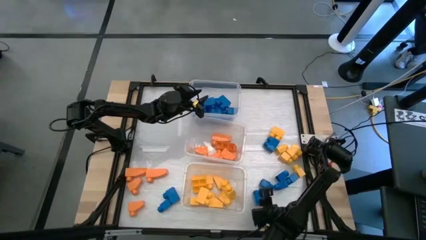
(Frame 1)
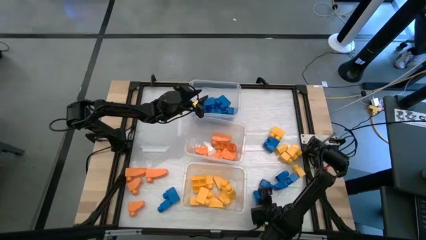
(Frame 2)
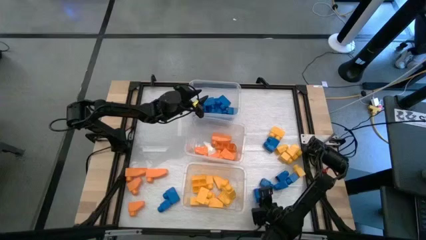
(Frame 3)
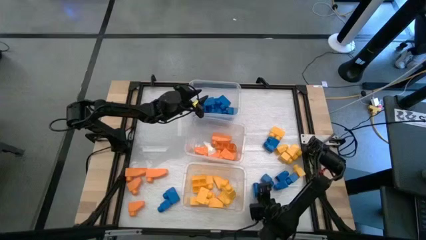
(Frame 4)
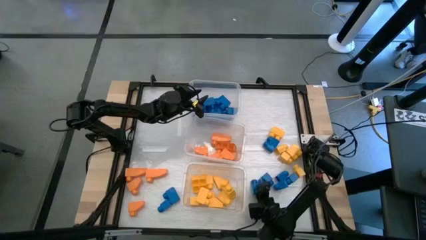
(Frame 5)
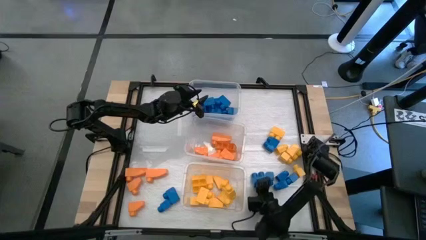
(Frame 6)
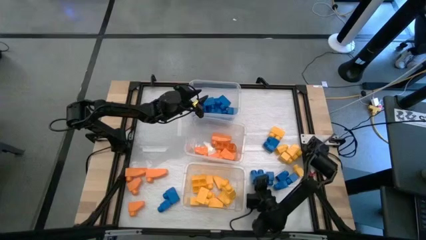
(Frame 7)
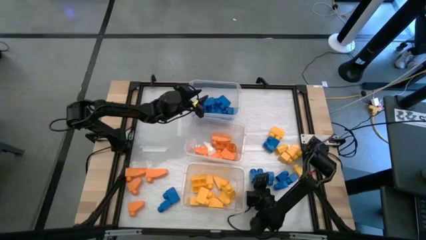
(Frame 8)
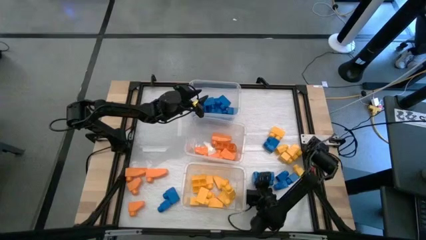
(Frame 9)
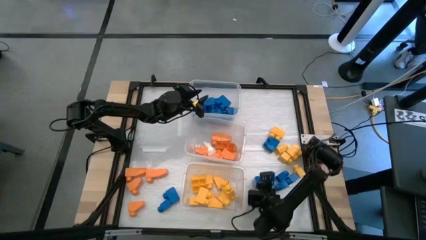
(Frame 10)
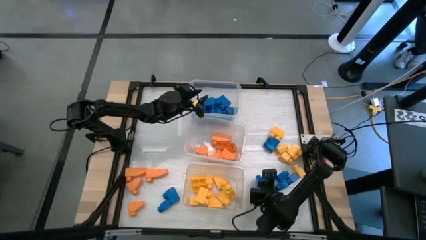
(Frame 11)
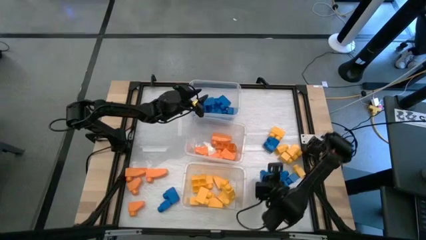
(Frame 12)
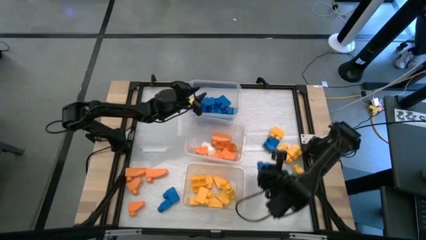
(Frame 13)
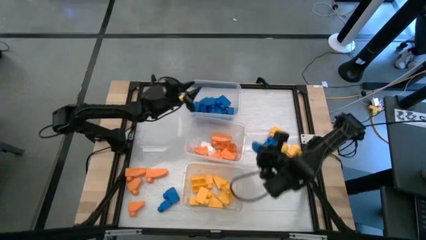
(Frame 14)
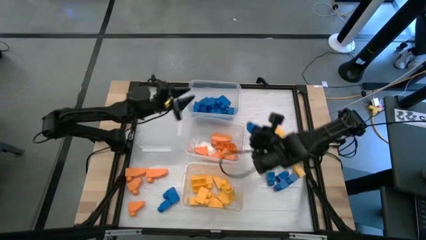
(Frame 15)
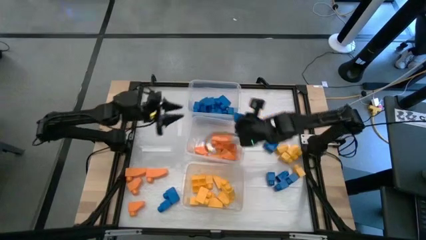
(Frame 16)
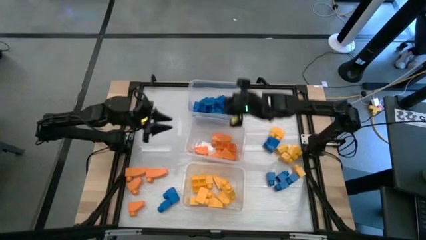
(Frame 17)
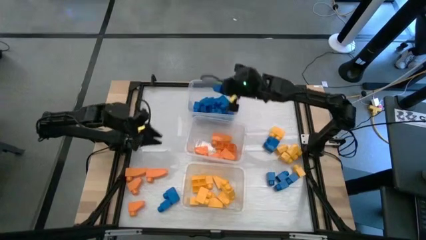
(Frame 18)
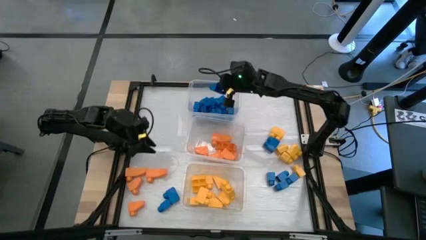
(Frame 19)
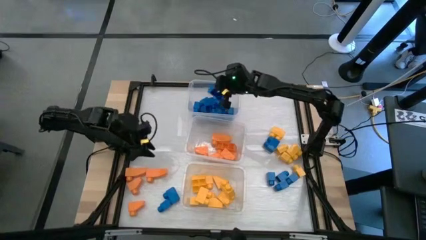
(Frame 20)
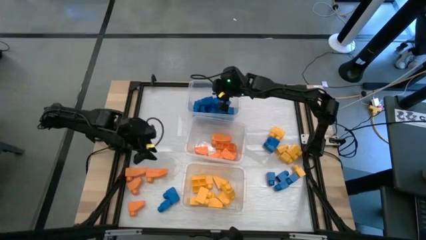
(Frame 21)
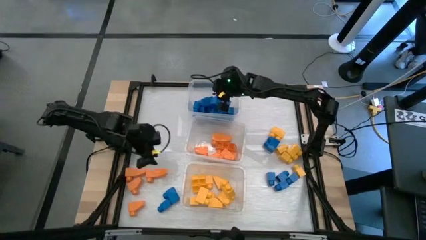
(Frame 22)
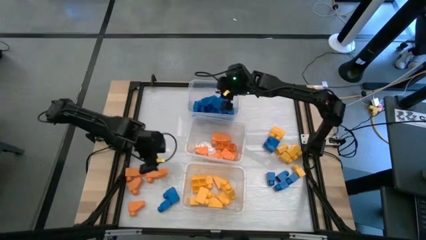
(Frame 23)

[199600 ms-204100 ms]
Task: Sort blocks
Put the blue game piece into the top transparent bin

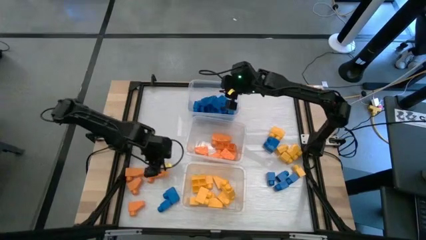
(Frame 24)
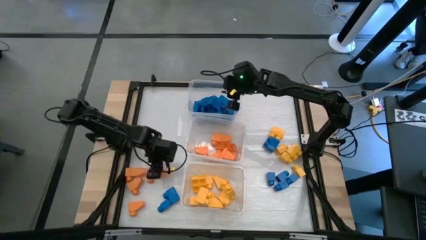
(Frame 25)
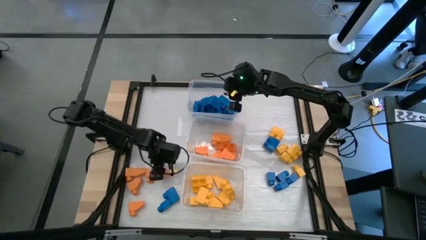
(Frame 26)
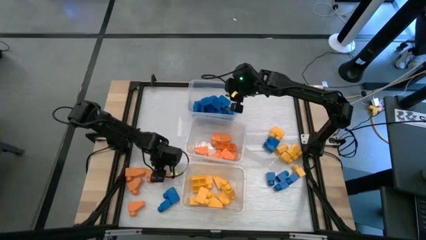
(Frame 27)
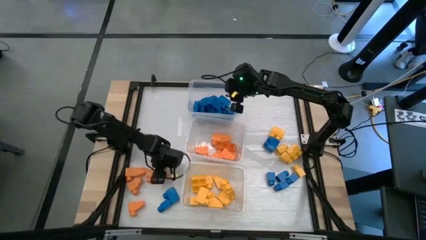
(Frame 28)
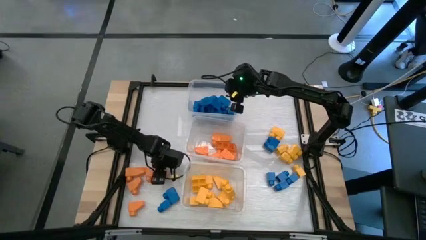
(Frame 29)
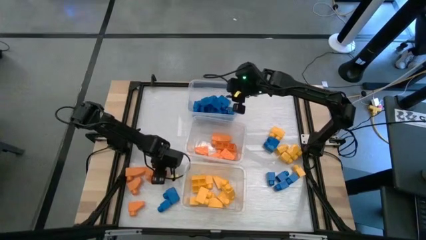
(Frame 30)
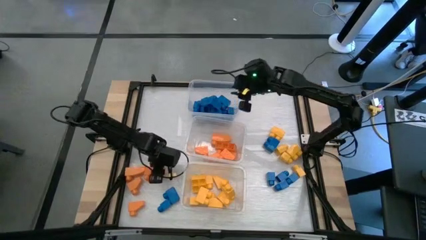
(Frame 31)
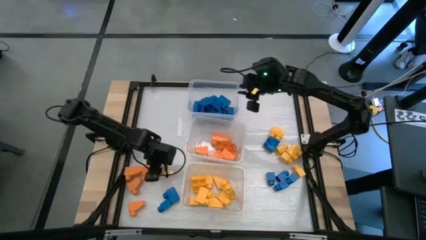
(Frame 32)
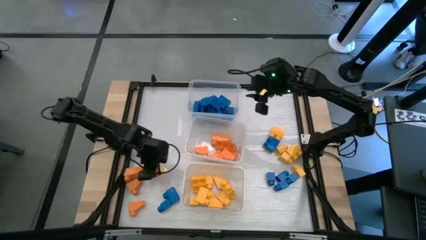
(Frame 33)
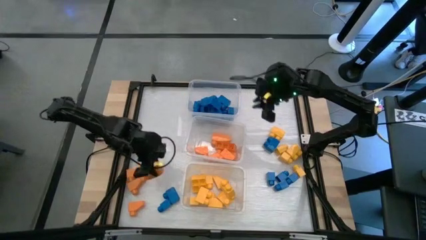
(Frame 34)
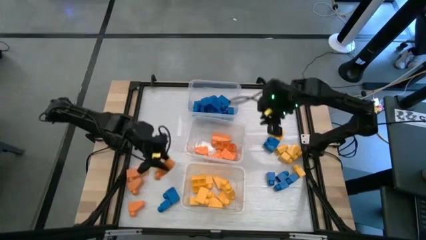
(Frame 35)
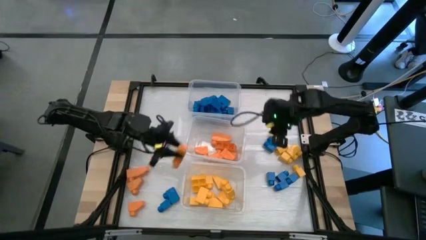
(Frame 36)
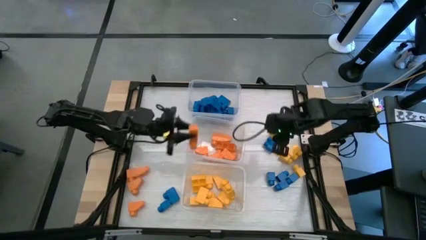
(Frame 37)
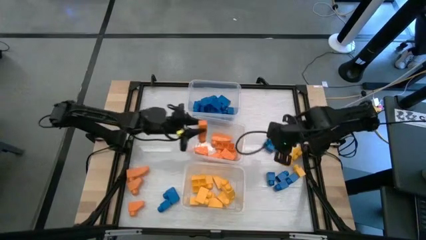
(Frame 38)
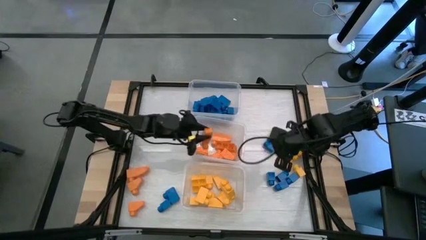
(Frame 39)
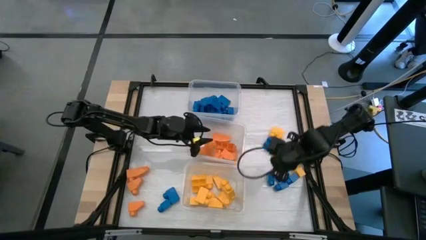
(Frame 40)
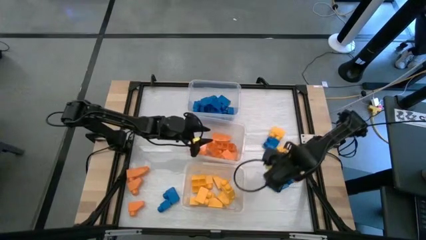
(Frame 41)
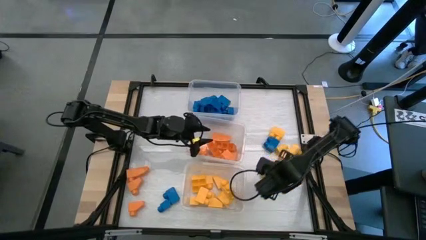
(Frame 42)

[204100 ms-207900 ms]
Put the orange game piece into the middle transparent bin

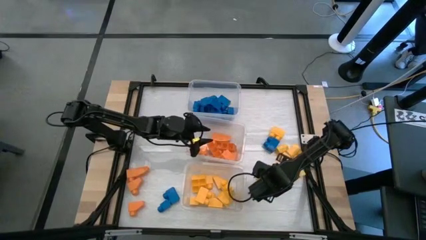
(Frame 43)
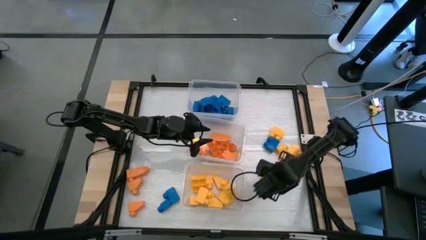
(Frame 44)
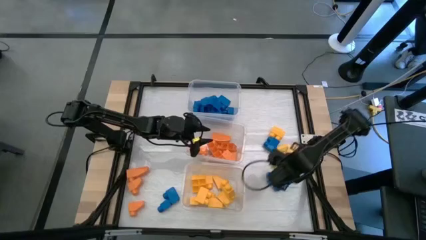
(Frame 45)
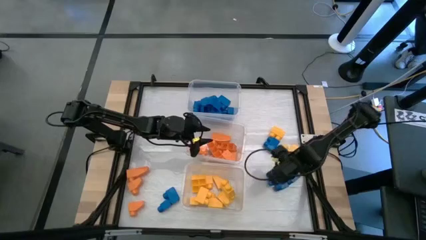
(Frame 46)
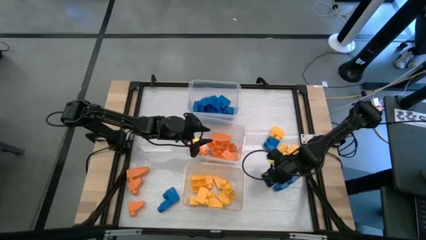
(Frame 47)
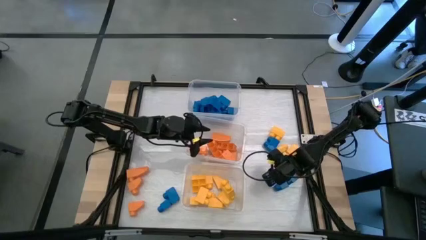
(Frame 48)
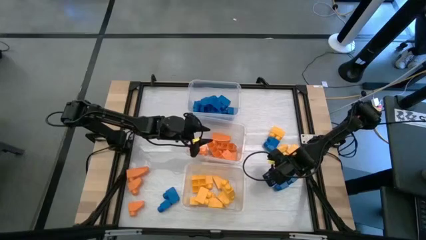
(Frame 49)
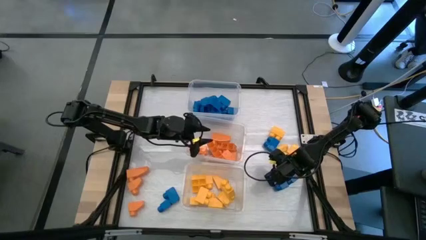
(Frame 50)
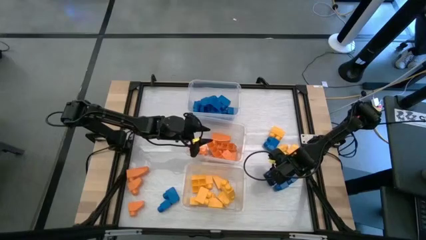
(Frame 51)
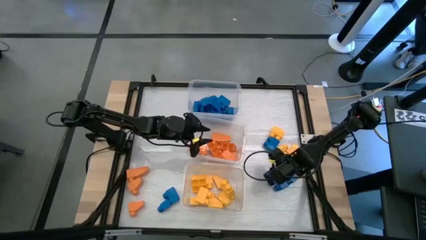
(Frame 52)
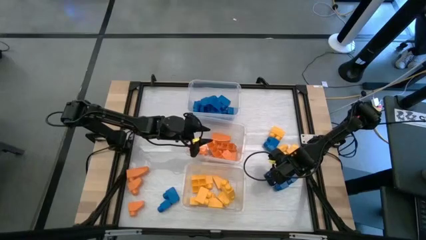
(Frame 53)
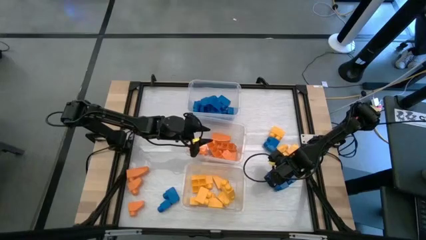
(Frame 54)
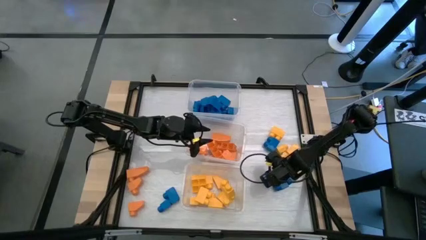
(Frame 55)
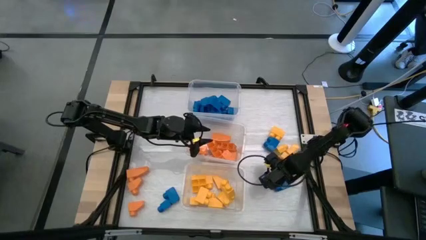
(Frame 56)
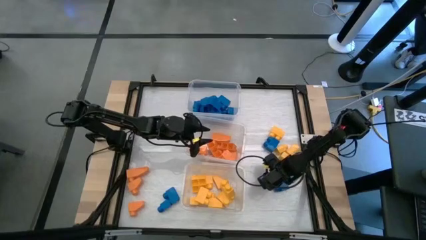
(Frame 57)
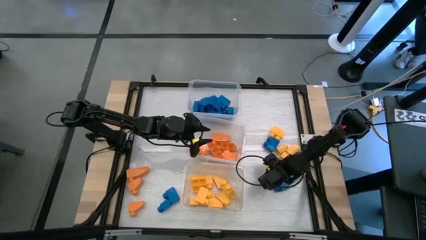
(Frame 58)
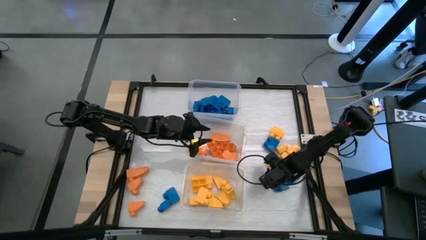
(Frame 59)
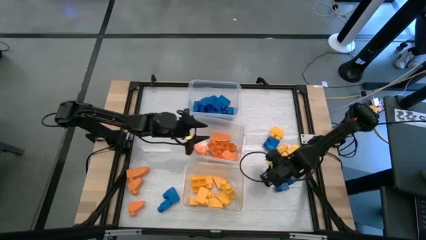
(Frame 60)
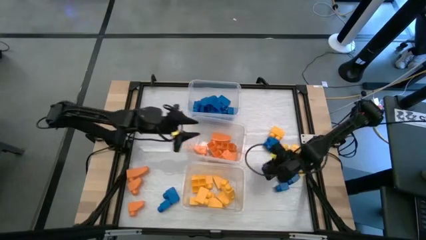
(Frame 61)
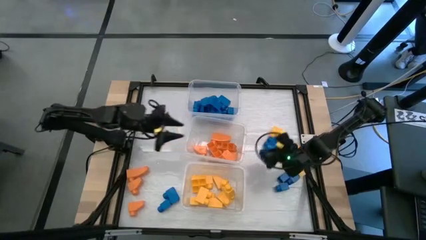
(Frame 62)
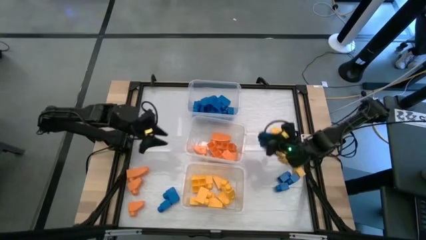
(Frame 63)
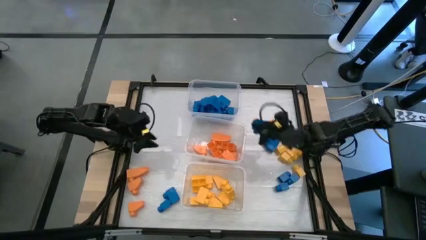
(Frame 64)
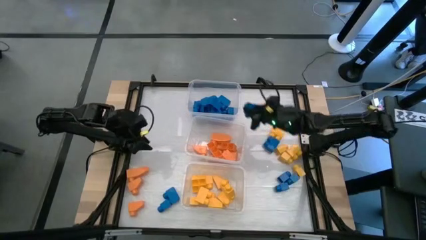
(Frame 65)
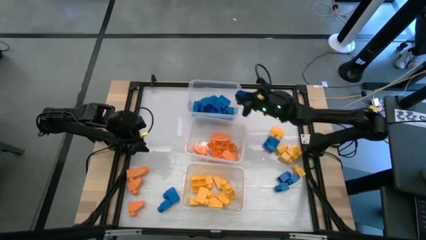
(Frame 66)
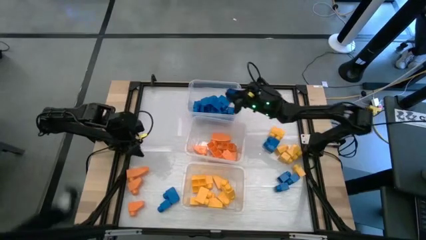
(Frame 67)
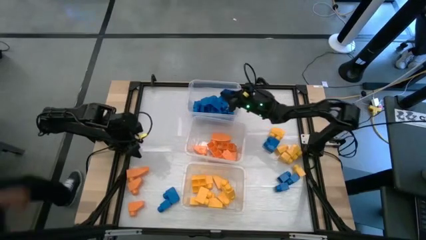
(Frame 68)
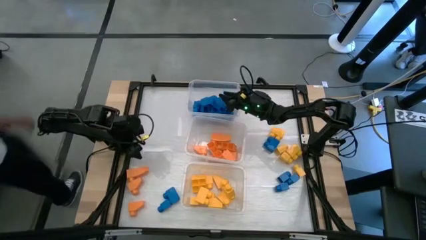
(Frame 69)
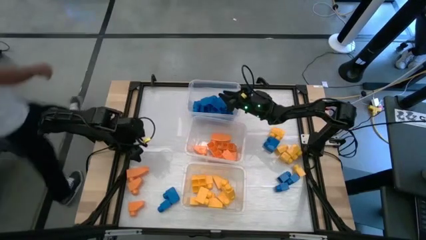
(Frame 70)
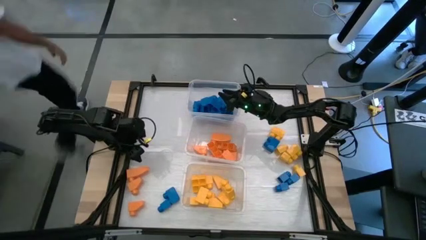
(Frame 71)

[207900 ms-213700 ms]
Put the blue game piece into the top transparent bin

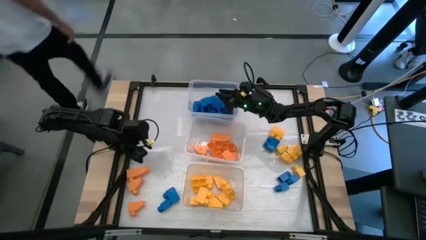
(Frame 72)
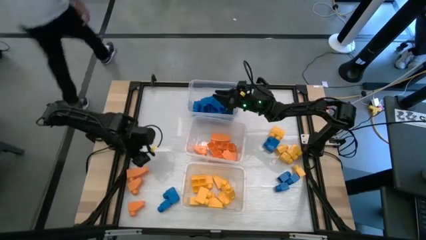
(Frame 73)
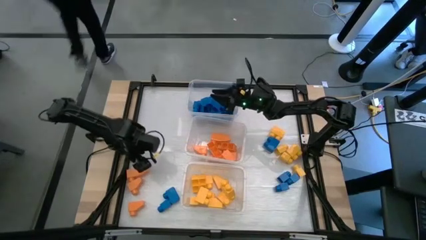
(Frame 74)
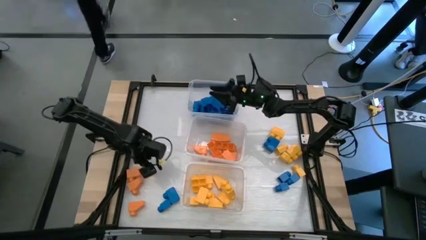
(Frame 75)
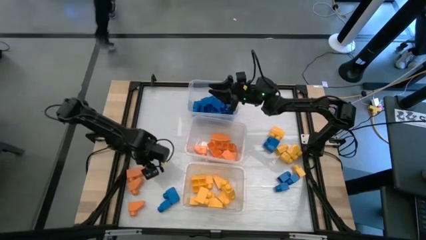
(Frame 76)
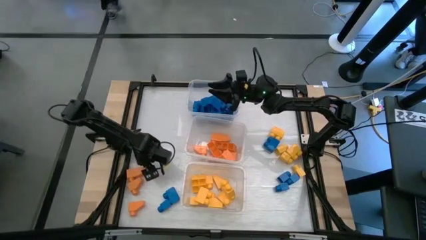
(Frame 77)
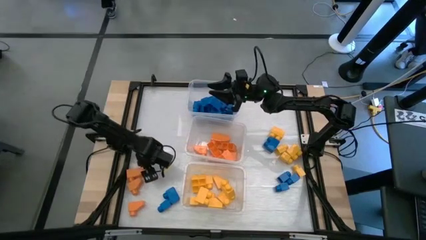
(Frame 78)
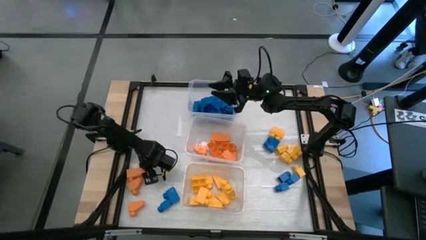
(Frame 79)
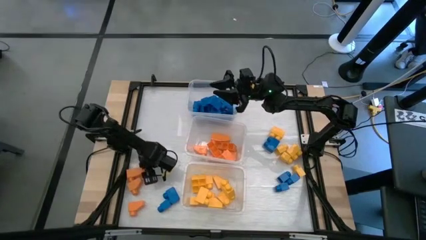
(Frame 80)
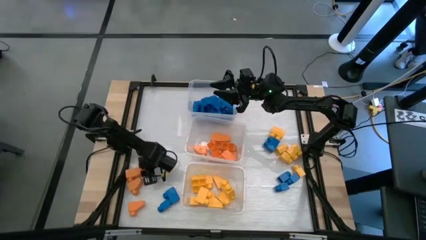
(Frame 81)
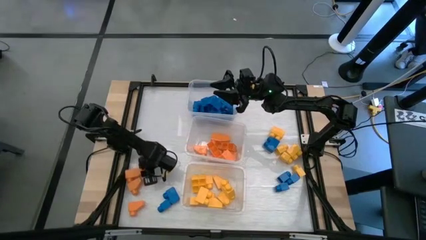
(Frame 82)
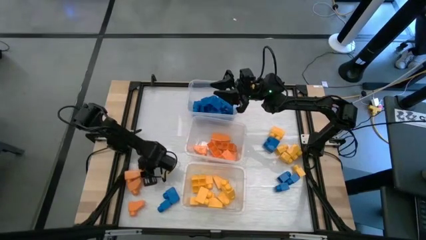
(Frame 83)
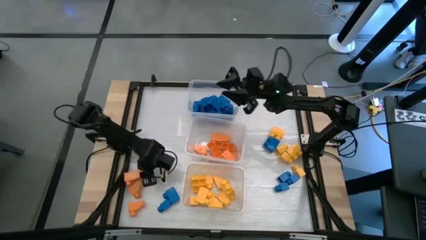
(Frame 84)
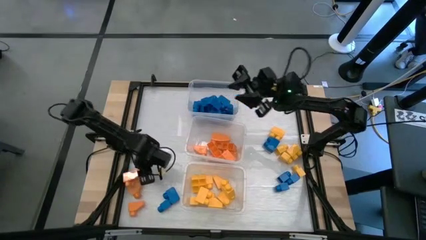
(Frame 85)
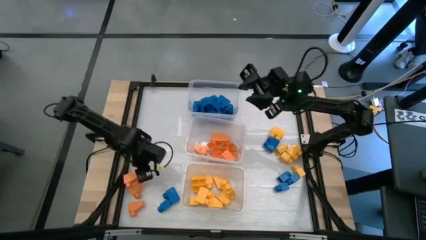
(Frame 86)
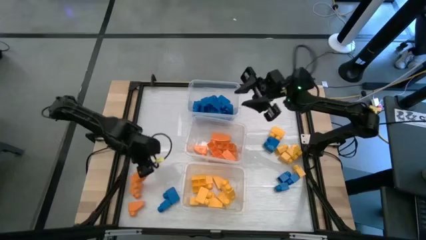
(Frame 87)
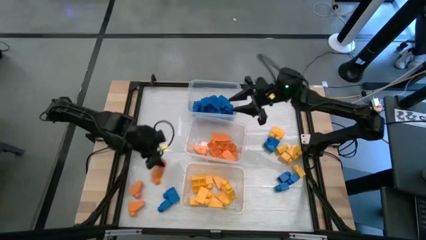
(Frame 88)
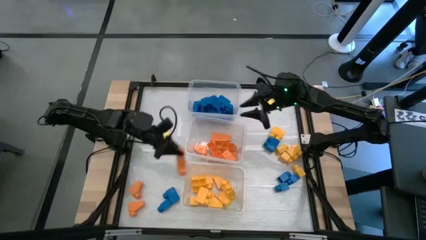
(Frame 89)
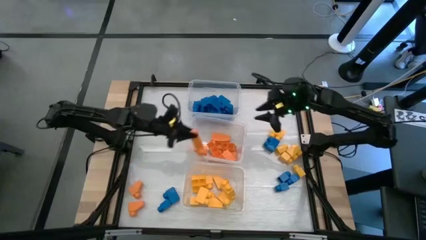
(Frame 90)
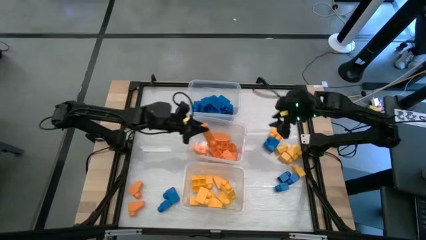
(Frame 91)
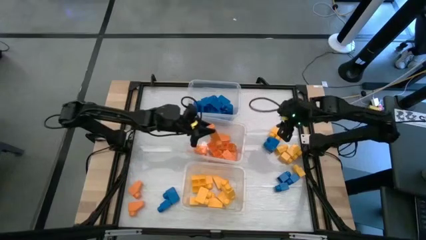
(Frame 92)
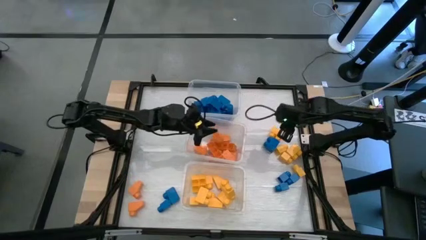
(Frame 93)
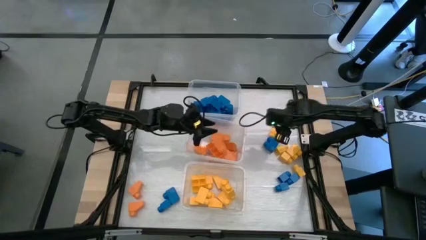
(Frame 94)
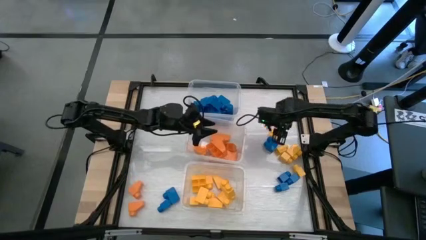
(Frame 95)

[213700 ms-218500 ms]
Put the orange game piece into the middle transparent bin
